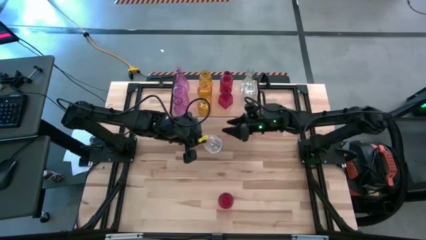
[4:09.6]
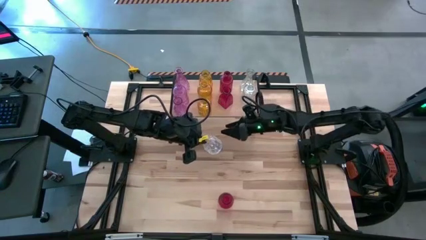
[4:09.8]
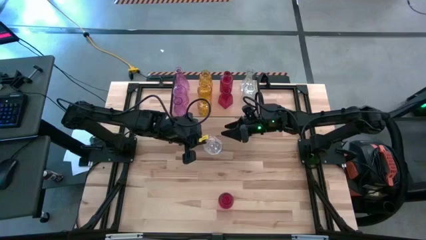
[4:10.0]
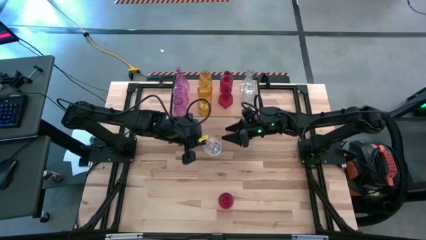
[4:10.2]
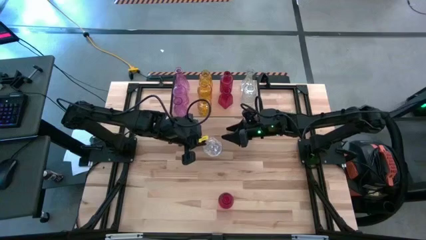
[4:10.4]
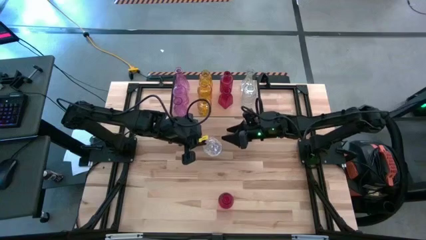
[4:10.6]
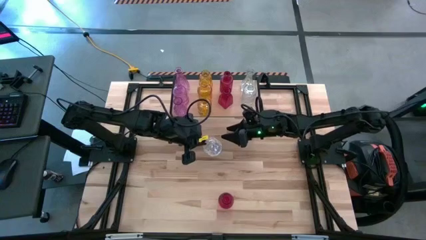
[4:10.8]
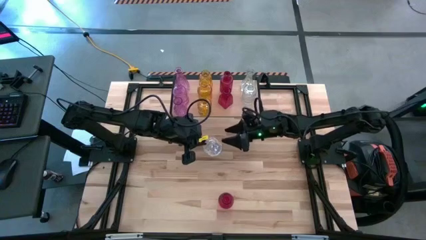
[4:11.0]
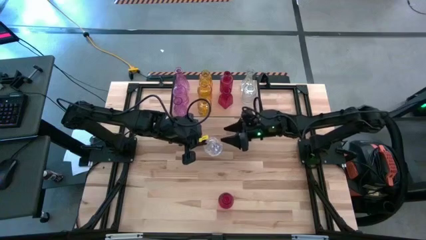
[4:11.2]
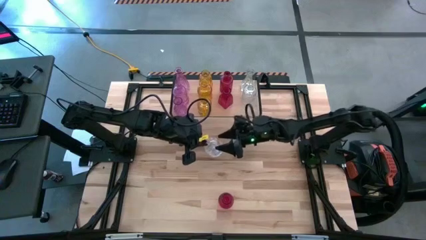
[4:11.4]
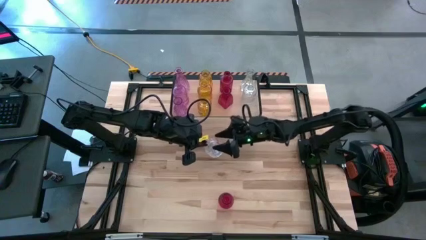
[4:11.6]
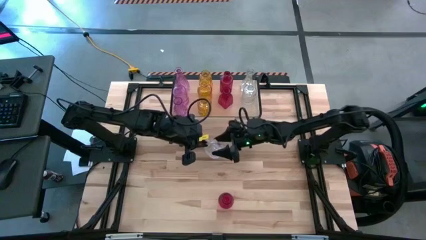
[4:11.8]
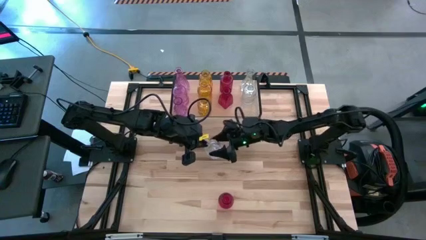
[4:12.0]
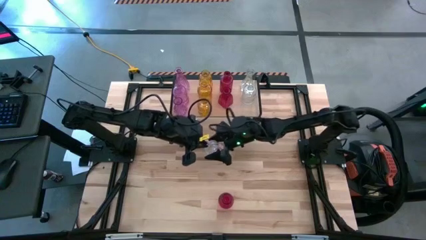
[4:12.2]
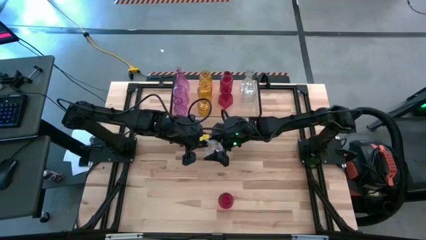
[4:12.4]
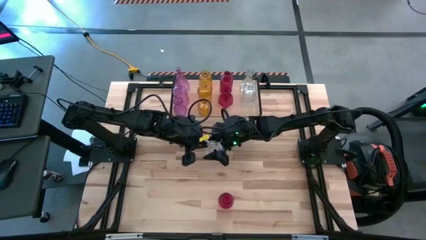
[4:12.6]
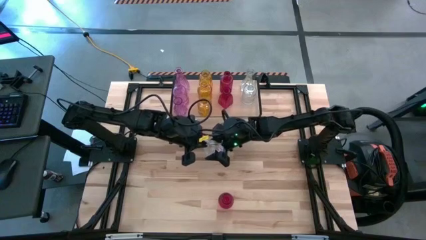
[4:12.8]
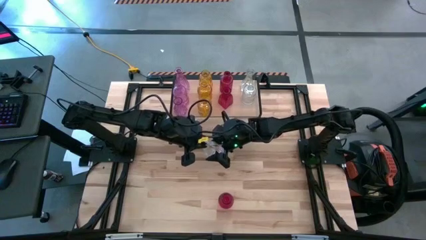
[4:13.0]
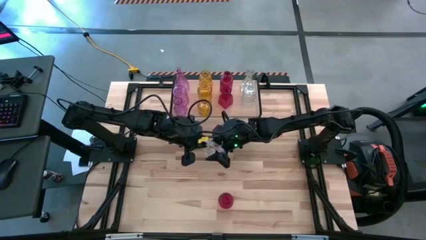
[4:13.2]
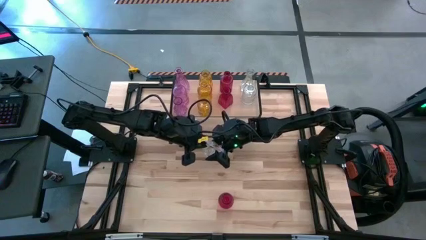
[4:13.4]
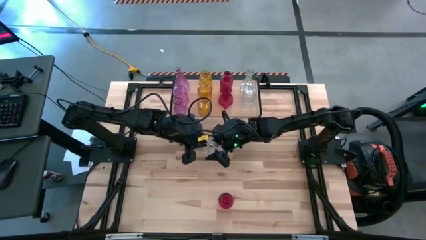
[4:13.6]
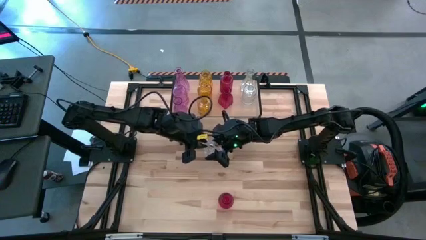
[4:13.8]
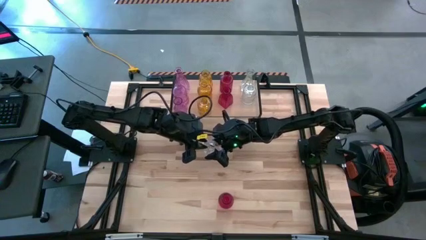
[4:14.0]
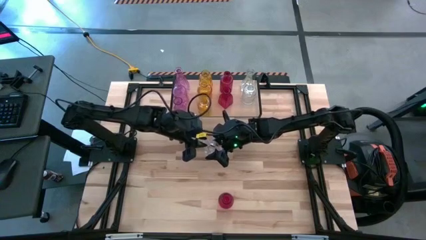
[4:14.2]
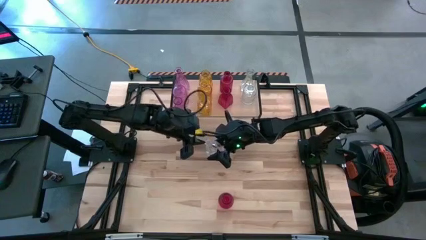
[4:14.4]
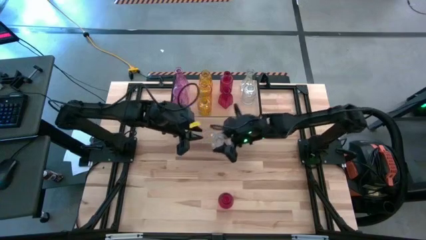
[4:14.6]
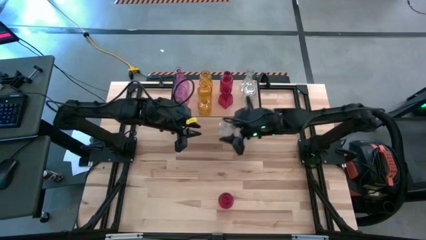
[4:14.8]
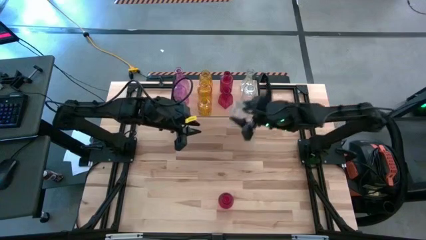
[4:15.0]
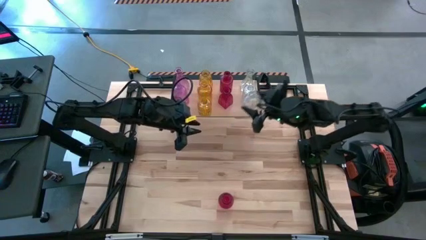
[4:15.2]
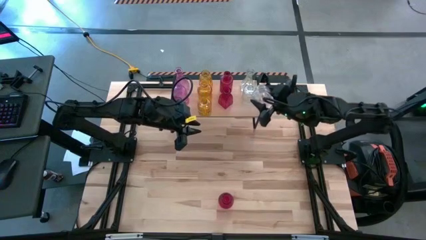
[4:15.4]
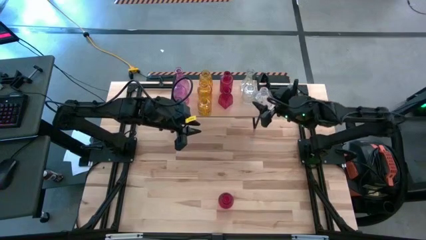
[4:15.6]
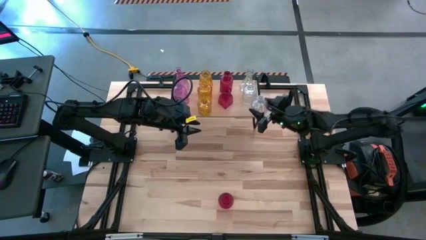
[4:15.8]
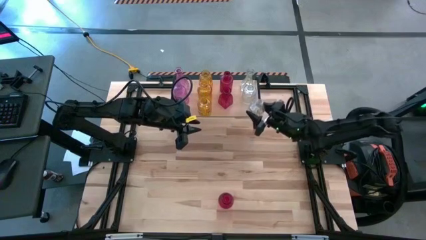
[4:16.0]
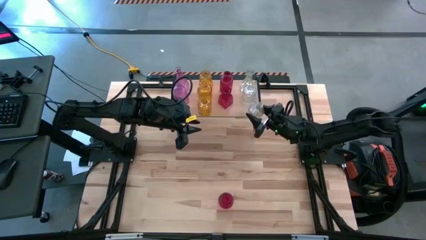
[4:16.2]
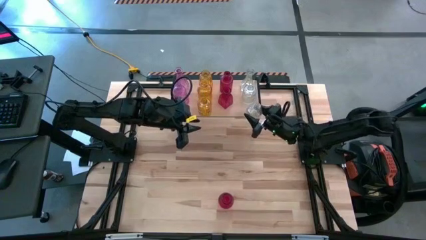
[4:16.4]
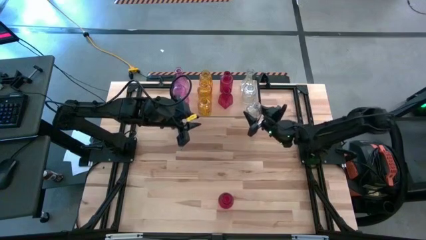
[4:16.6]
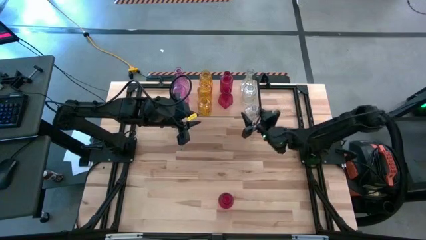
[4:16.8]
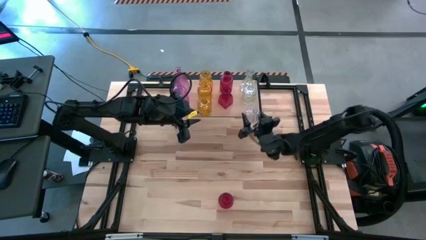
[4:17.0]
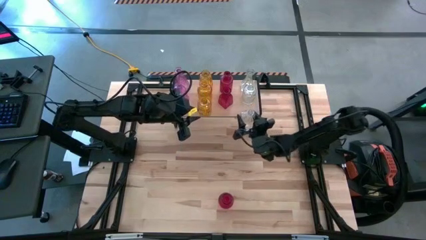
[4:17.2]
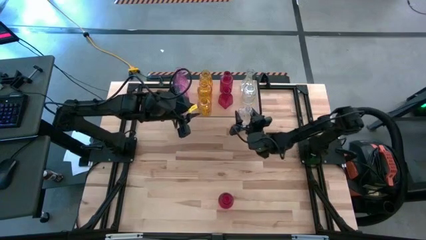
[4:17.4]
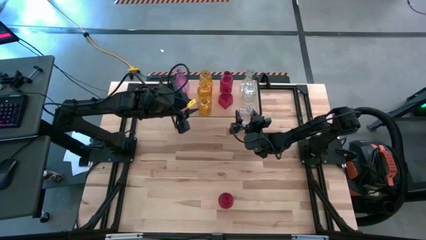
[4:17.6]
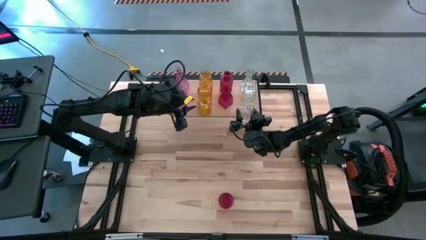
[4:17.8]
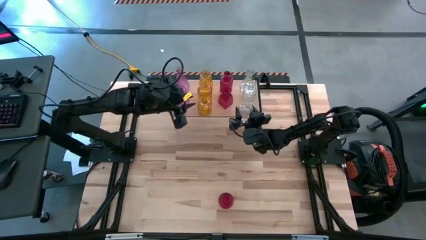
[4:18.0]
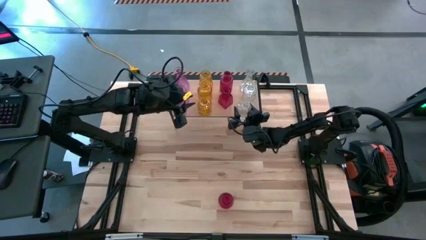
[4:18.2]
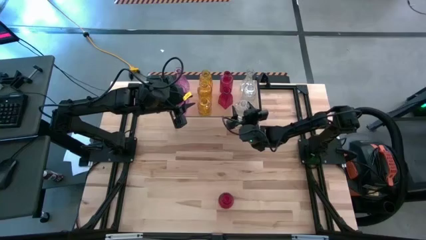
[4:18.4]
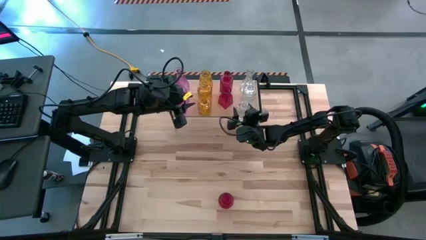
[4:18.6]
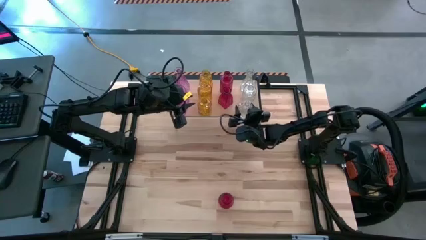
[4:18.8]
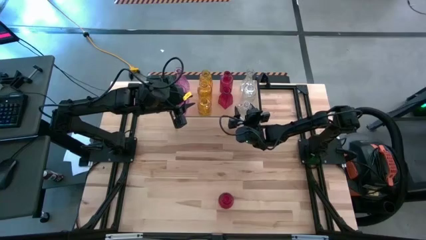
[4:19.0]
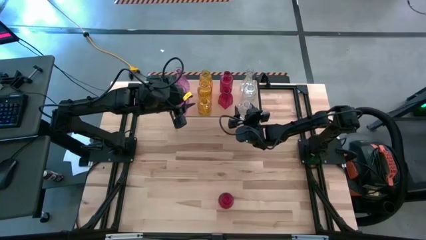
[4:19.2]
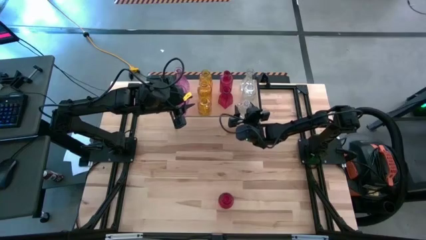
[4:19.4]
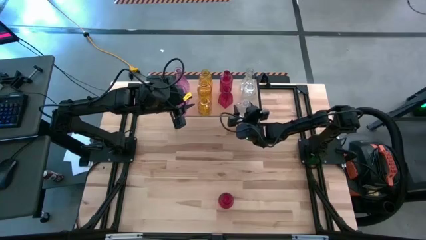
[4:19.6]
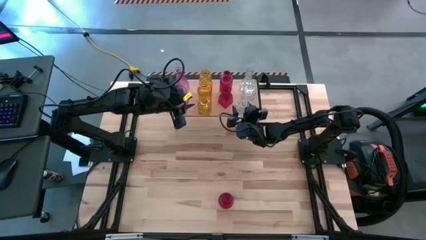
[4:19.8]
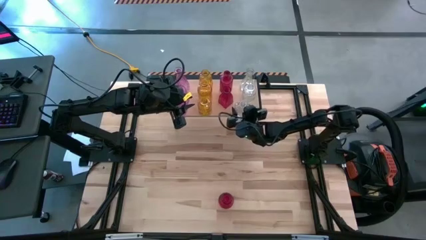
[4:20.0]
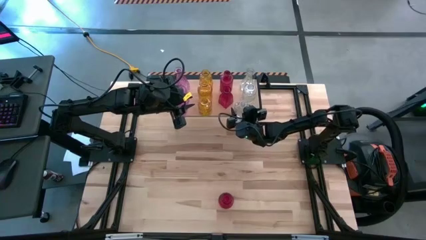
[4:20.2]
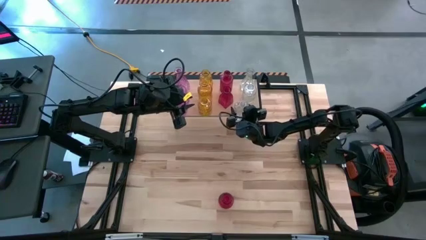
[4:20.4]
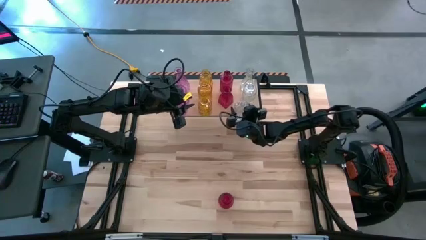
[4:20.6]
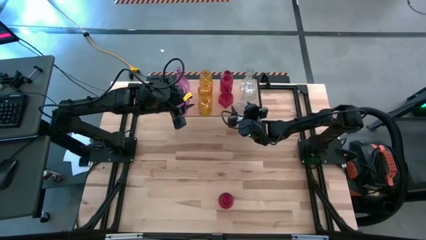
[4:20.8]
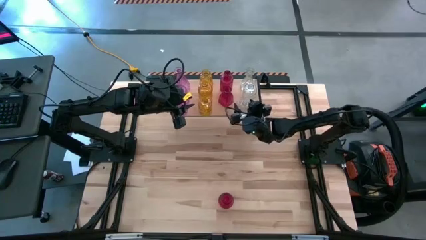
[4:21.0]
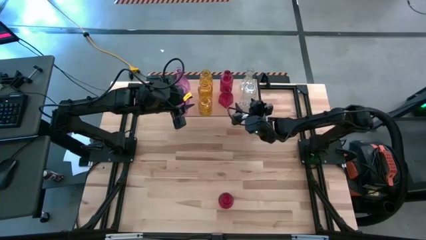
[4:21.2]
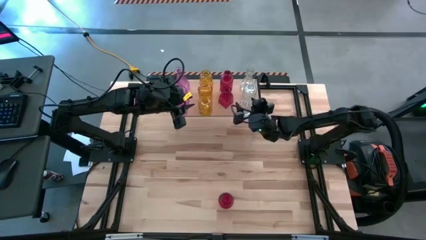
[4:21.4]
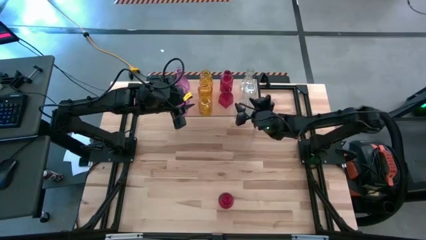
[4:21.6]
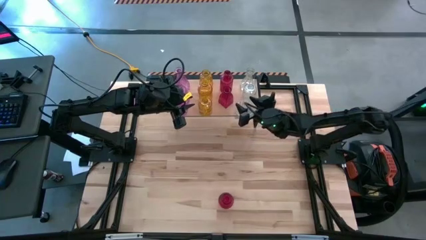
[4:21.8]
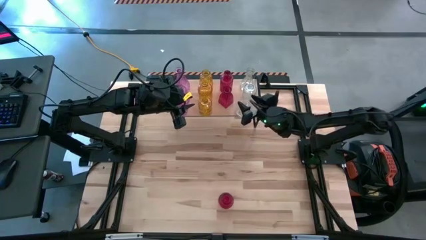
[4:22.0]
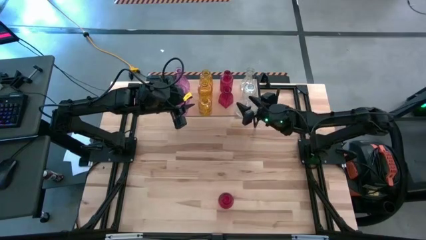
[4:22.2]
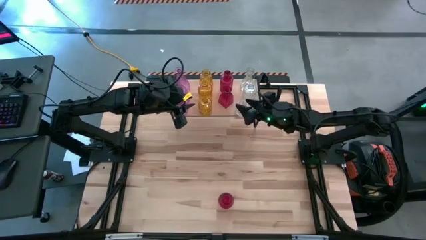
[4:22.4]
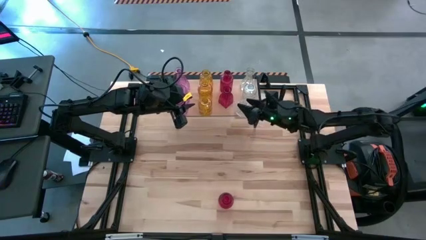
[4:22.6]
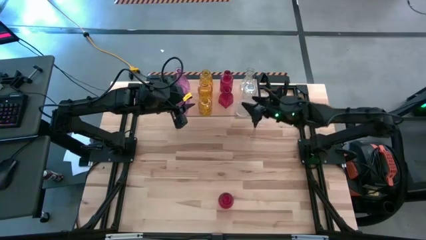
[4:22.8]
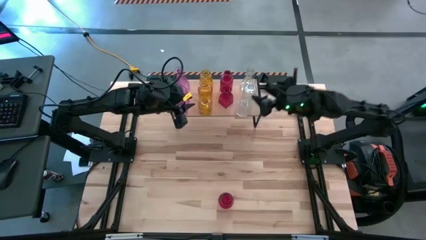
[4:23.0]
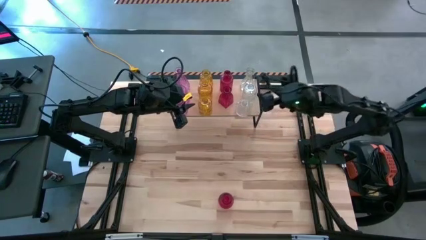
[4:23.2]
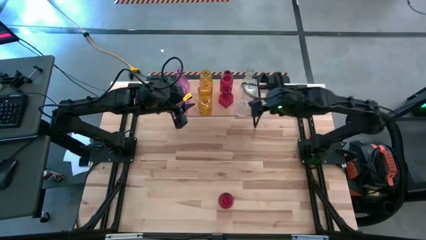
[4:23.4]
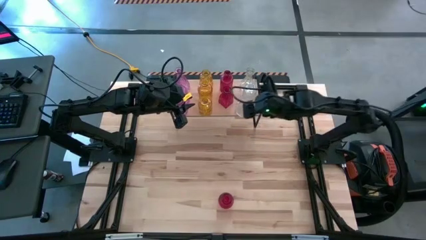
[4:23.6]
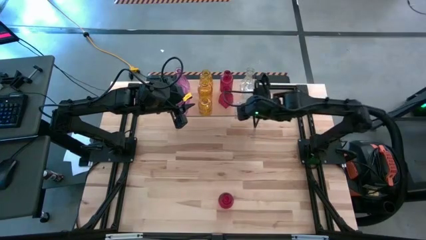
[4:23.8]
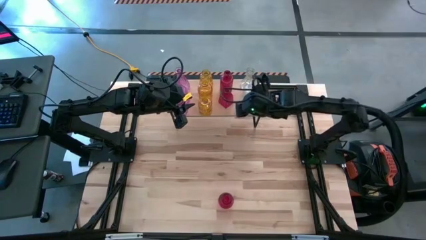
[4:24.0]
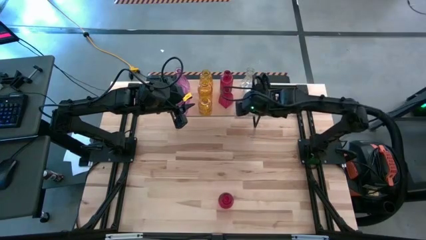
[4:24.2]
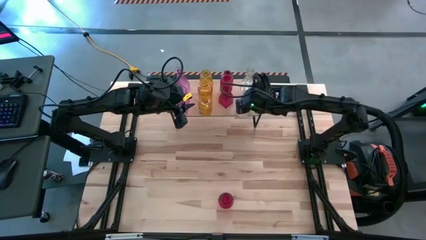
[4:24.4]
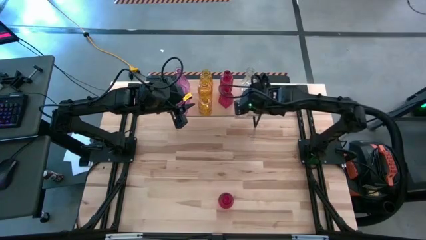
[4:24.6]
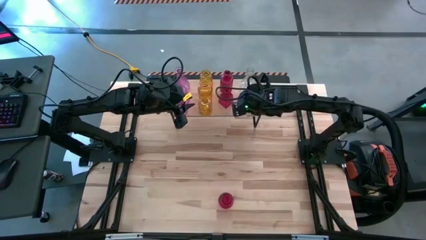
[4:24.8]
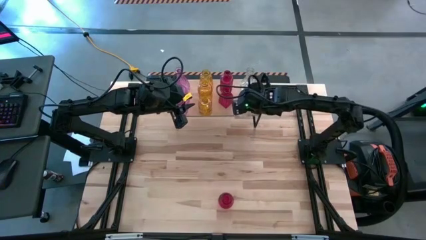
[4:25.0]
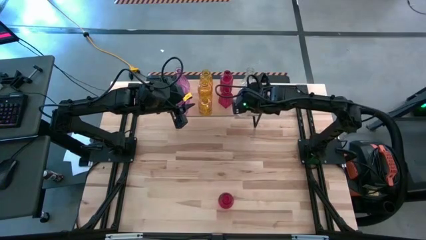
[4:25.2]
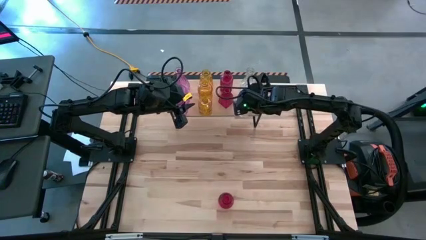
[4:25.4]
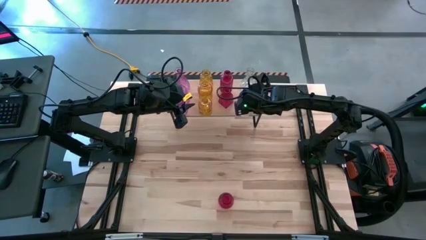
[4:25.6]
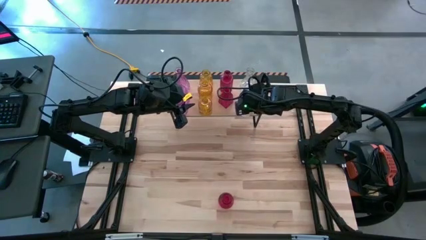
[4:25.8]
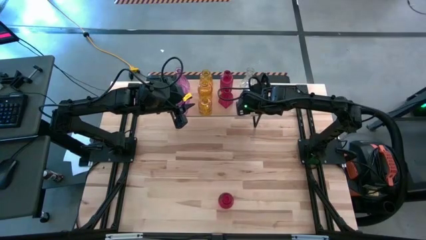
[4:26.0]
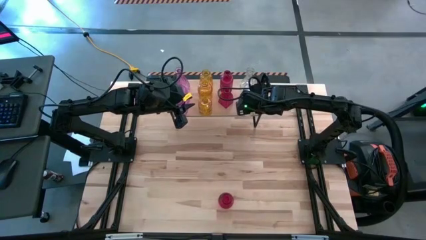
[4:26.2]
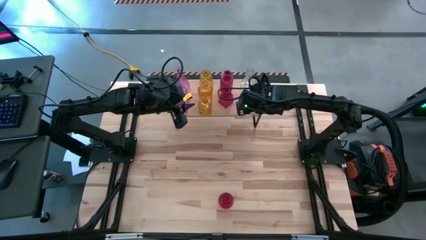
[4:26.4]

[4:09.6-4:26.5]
Task: sort vases onto shelf
Put the transparent vase on the shelf and align it with the other transparent vases
